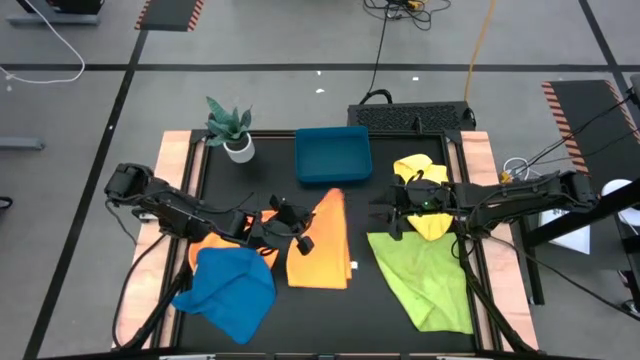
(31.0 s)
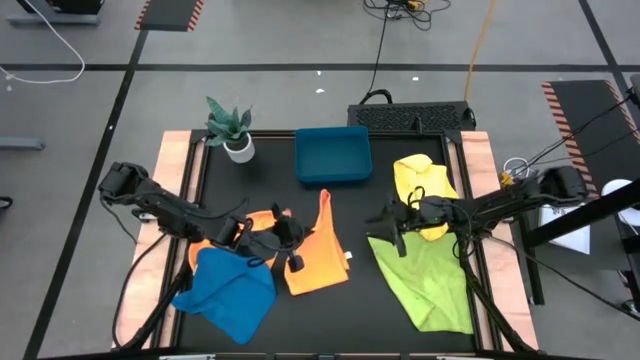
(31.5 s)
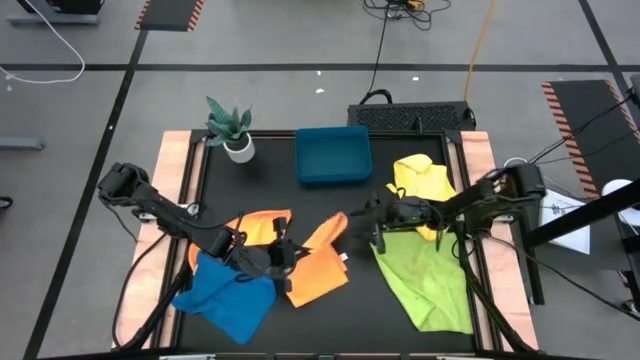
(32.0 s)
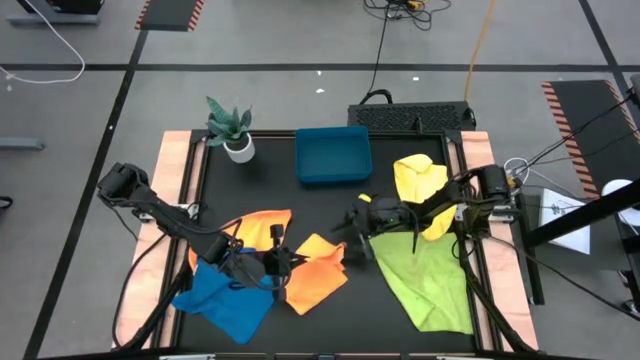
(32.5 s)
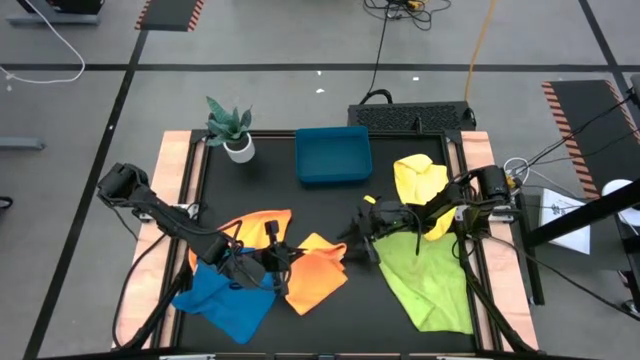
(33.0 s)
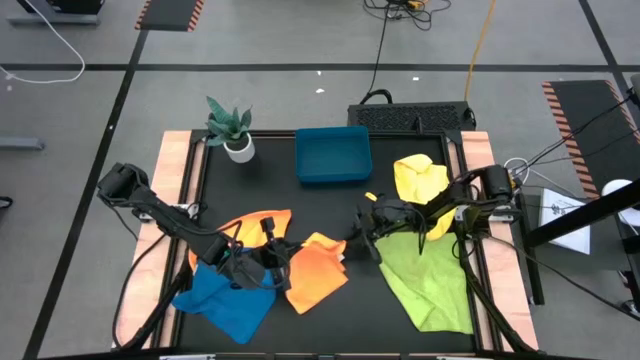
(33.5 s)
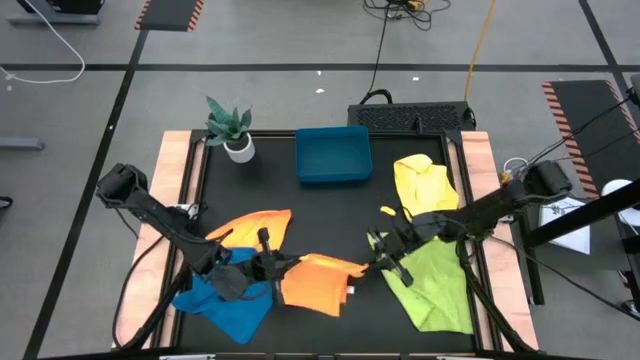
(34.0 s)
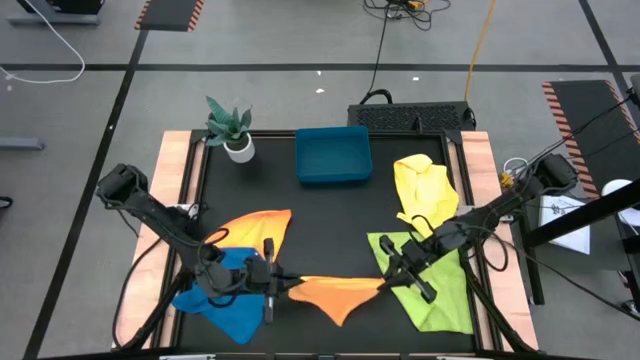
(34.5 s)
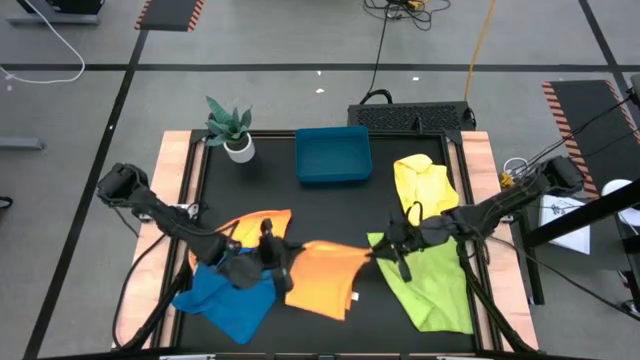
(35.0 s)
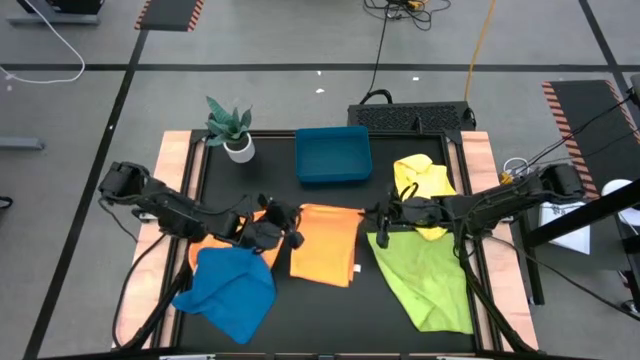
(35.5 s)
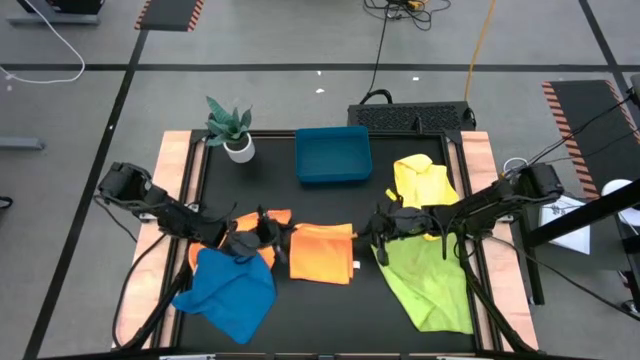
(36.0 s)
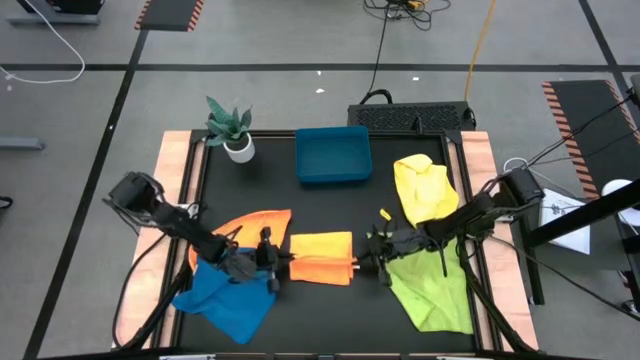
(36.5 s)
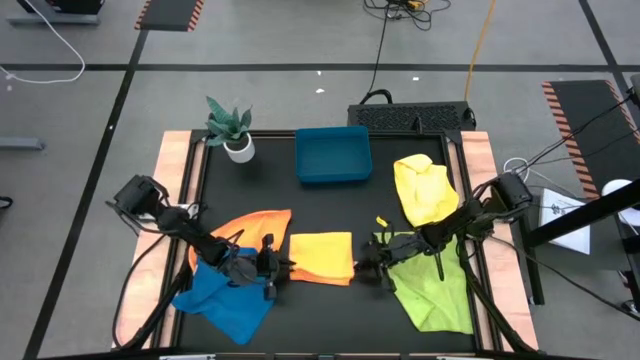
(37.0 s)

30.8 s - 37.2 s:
Task: Fold microfiber towels
Fold the right orange microfiber towel

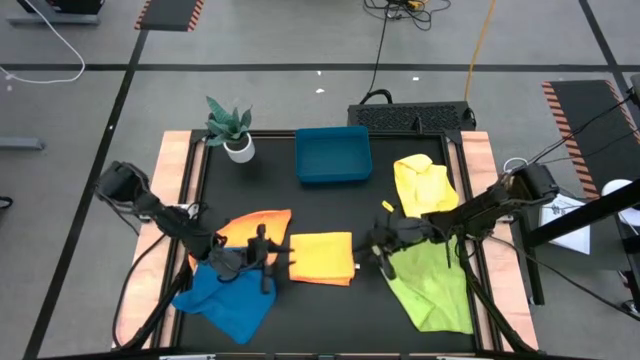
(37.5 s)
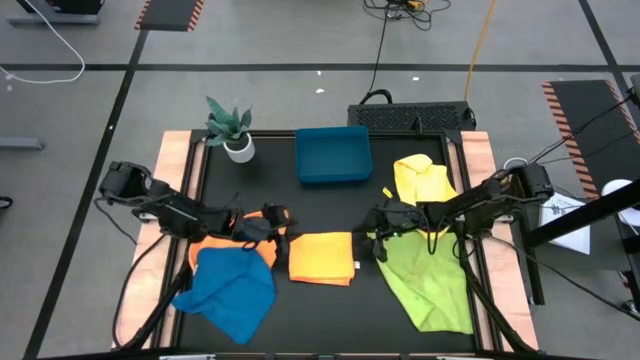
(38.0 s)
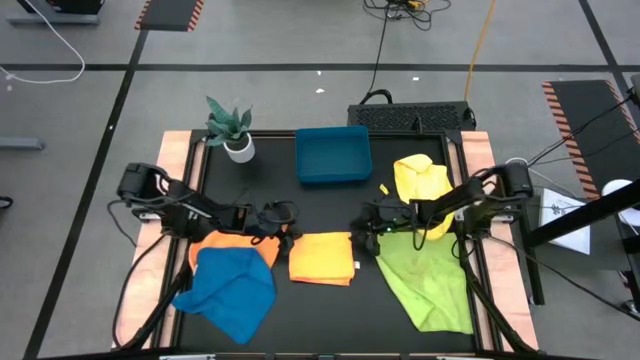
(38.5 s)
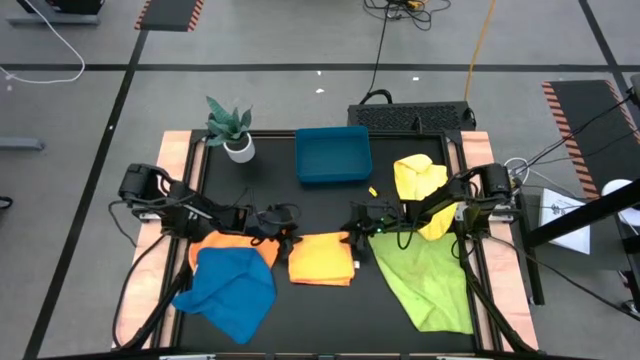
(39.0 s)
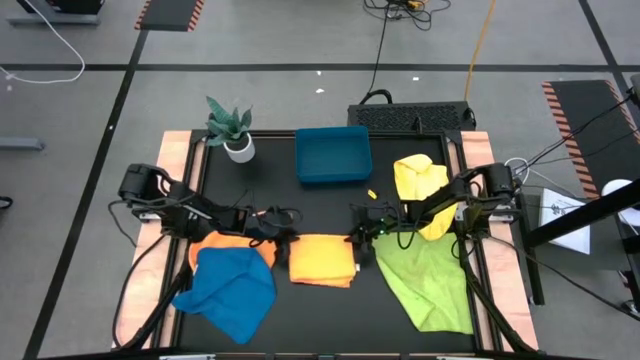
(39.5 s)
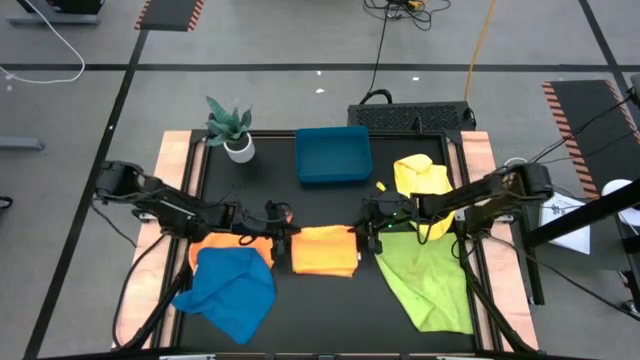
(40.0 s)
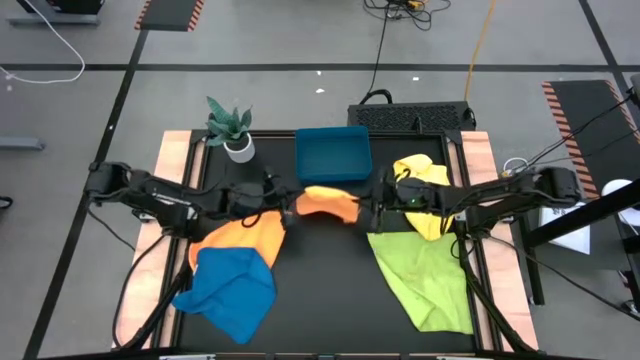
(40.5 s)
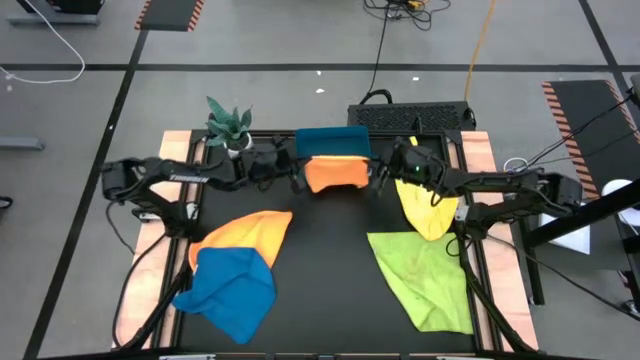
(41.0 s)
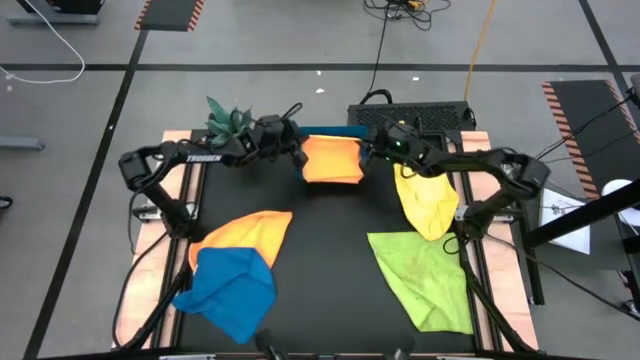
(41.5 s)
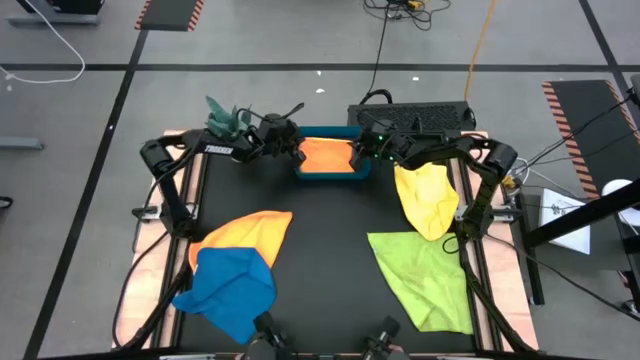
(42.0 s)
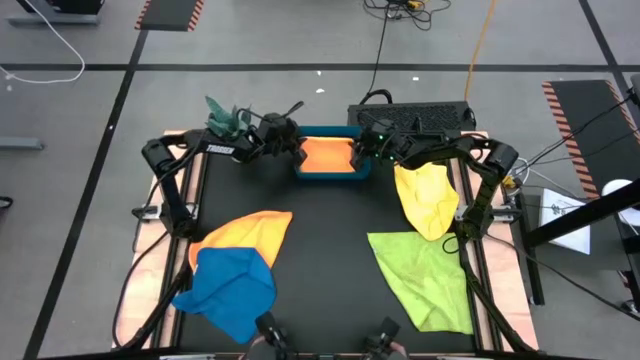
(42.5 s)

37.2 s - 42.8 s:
Put the orange folded microfiber cloth into the blue bin

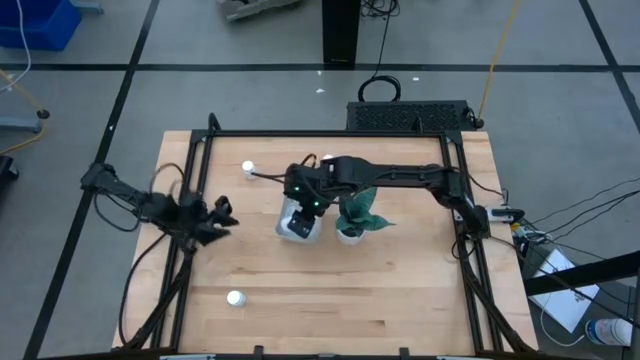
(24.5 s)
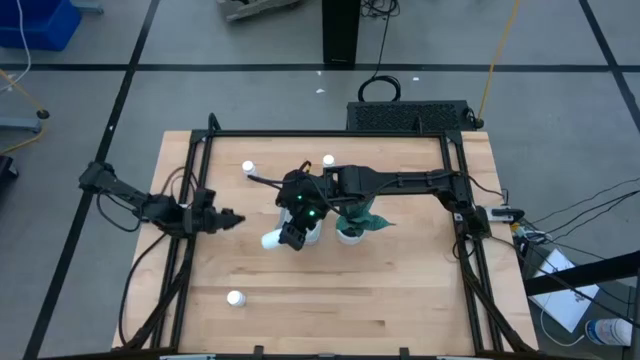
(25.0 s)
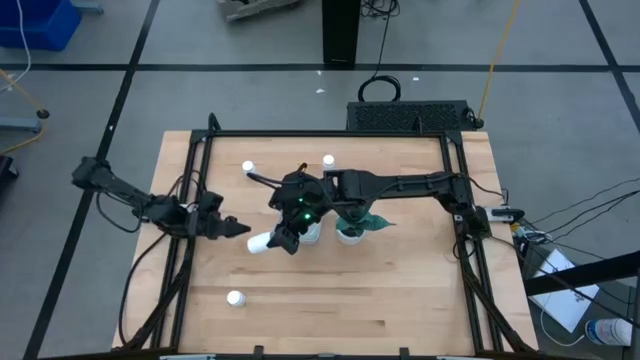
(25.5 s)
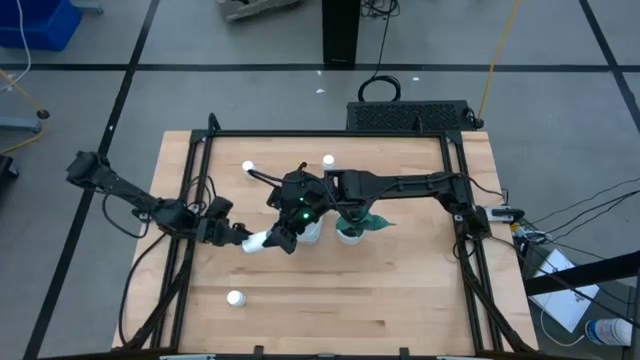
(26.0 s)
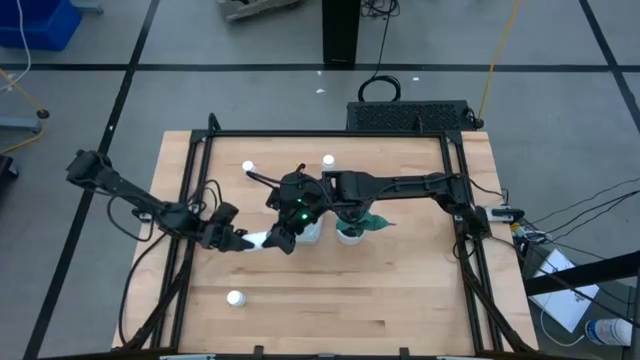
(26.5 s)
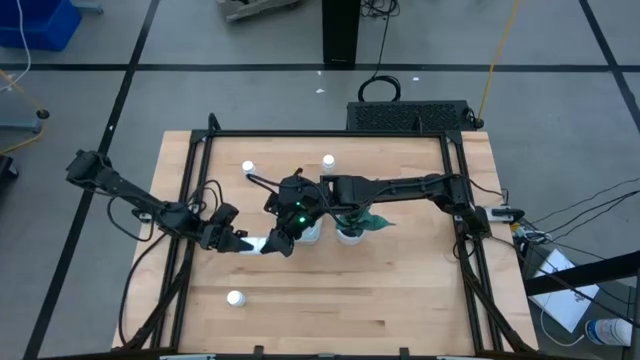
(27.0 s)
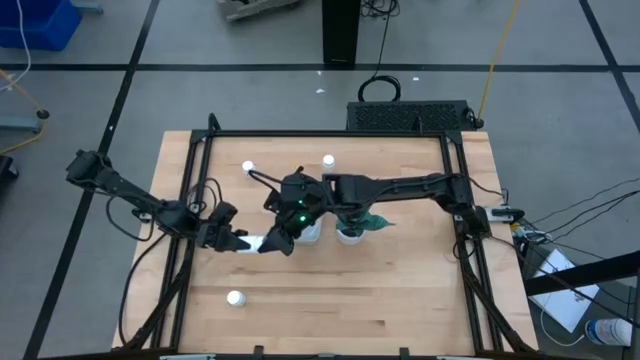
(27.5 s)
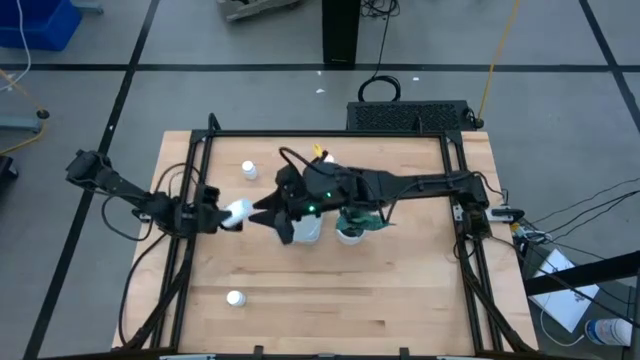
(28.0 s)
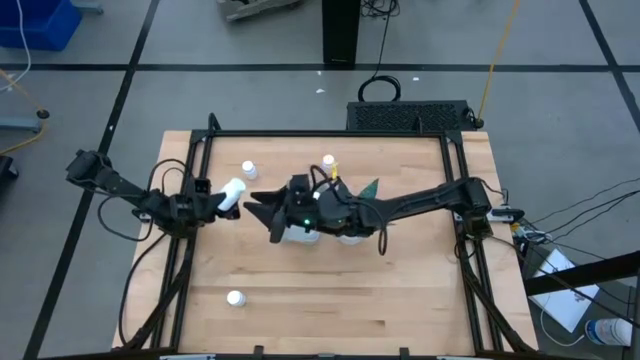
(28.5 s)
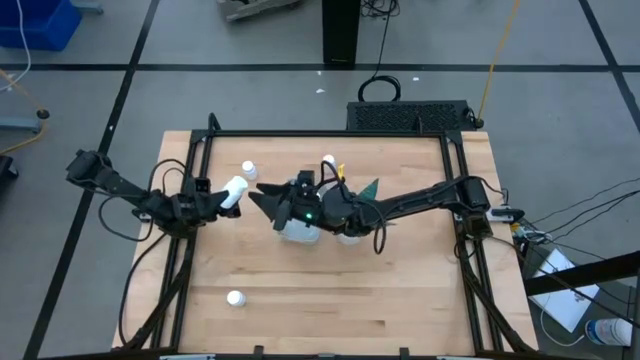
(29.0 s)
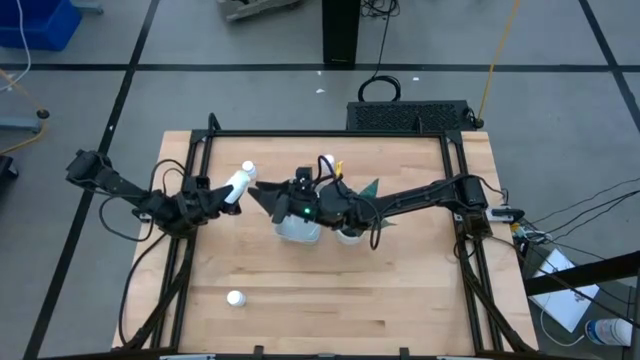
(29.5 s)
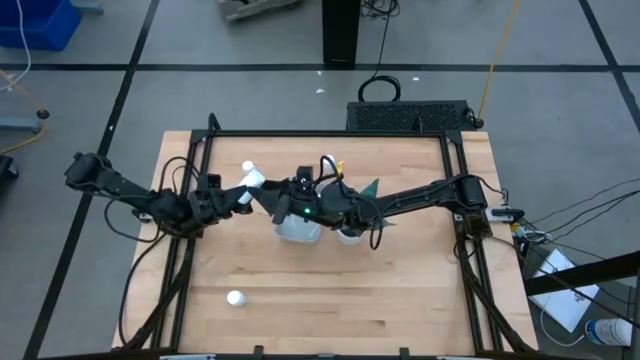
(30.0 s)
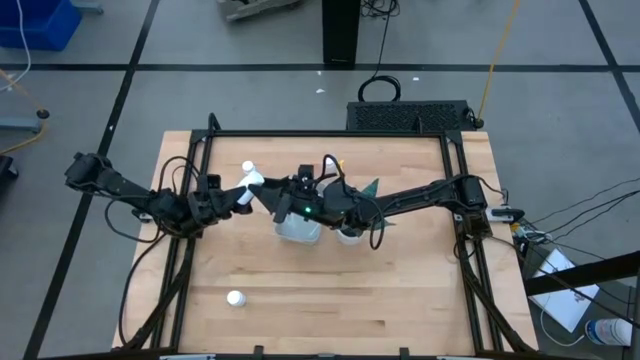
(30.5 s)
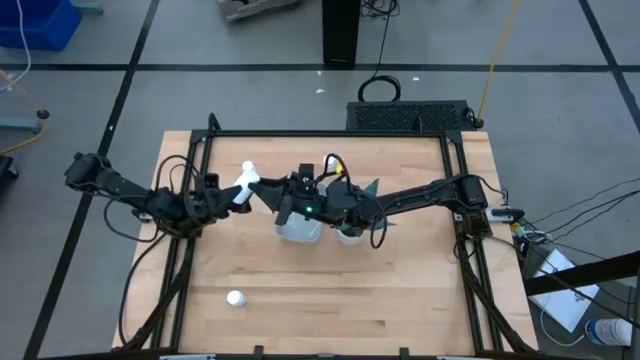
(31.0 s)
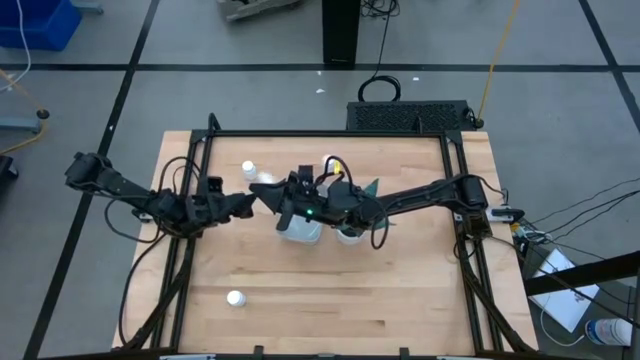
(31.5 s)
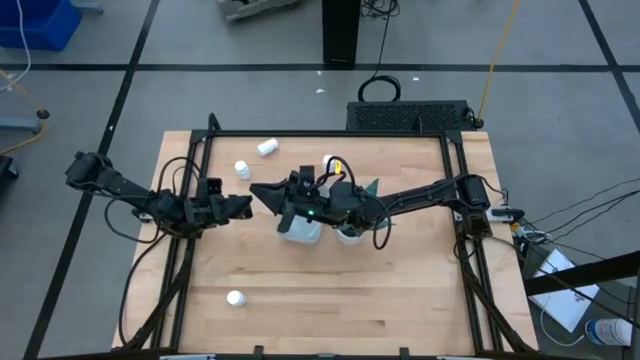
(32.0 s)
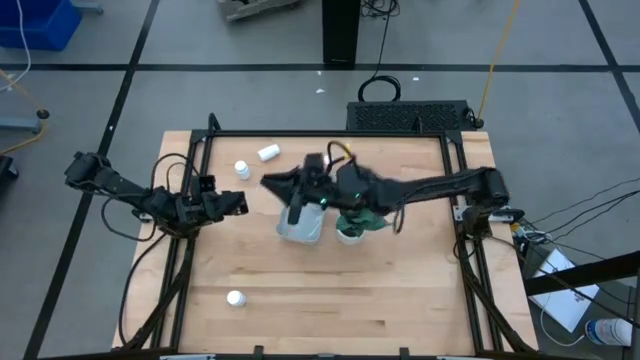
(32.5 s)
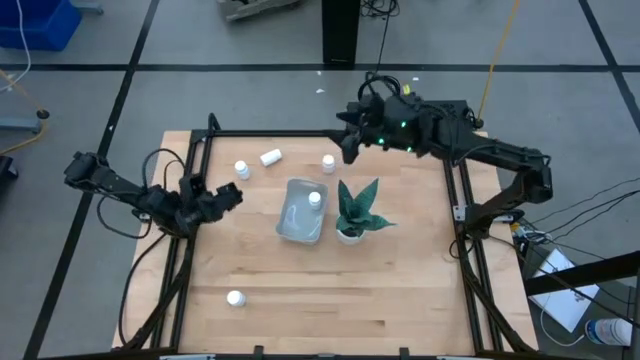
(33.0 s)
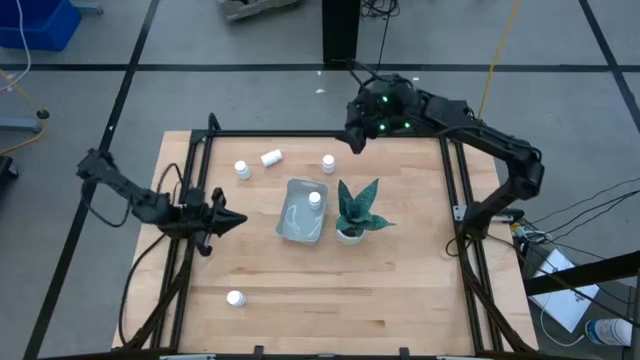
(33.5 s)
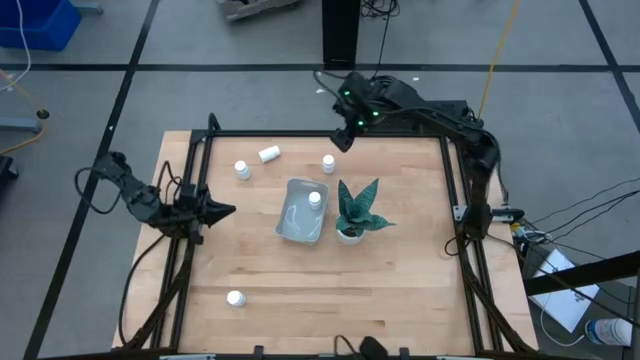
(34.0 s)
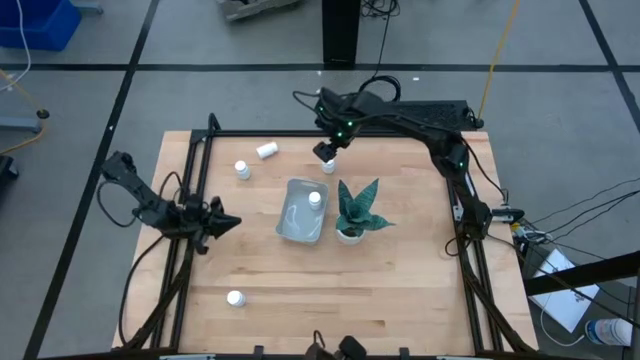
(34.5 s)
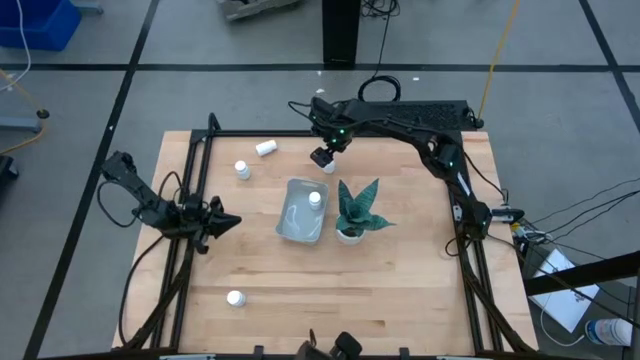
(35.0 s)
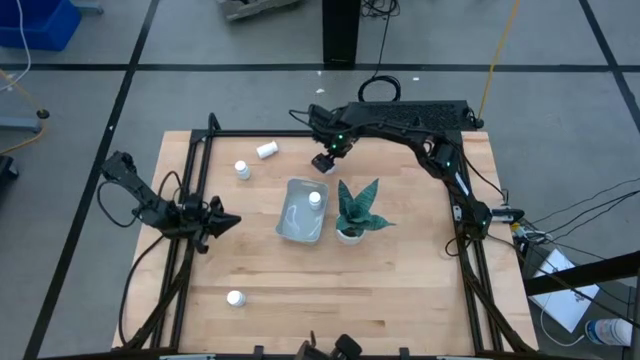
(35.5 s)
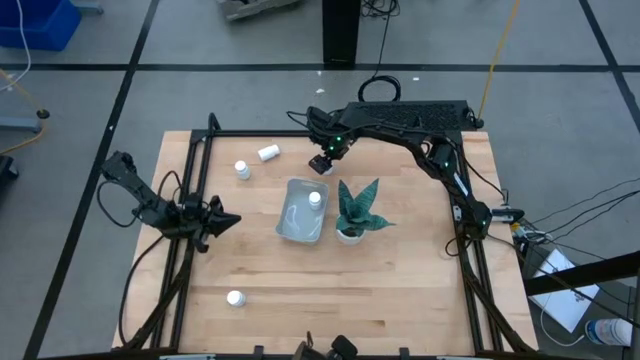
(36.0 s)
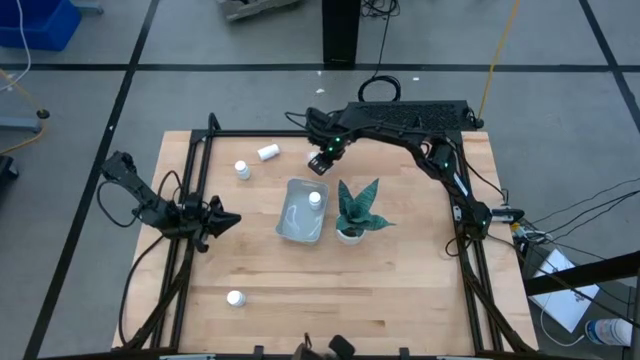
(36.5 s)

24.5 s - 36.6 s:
Task: Pick and place pill bottles into a basket
Put the white pill bottle into the gray bin
